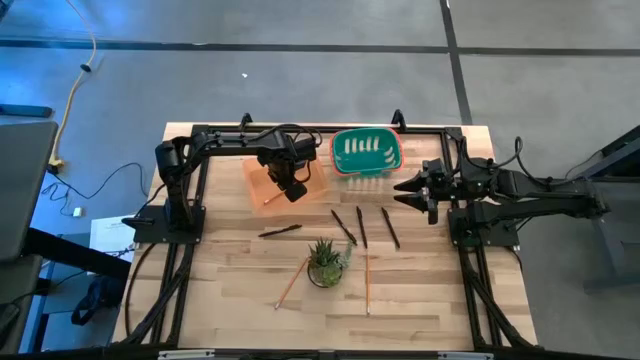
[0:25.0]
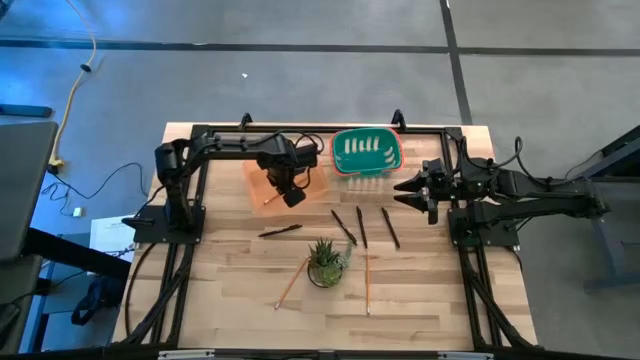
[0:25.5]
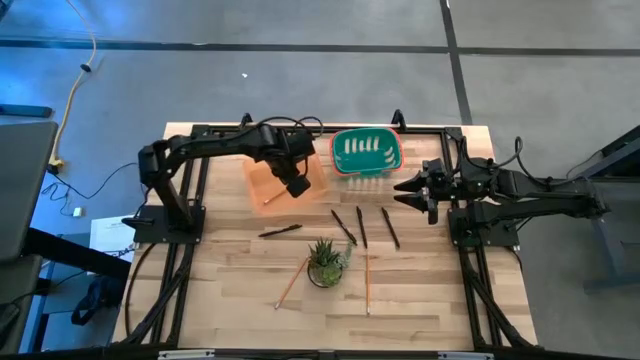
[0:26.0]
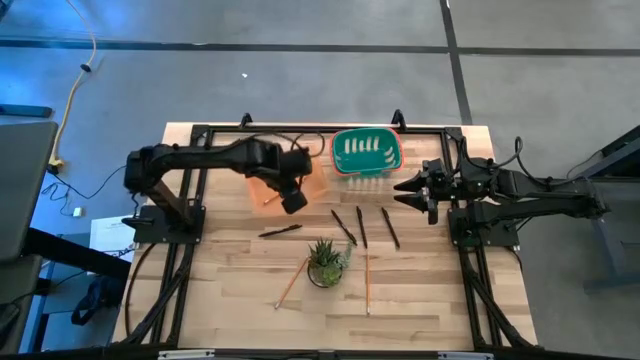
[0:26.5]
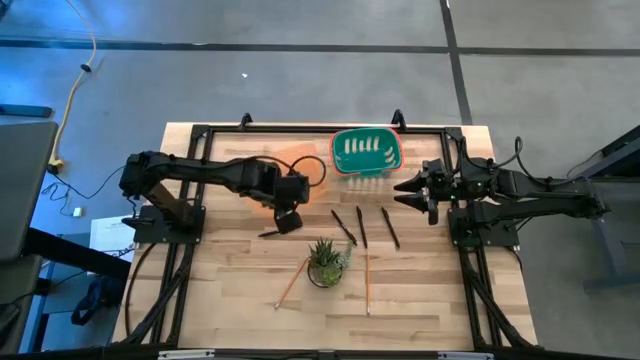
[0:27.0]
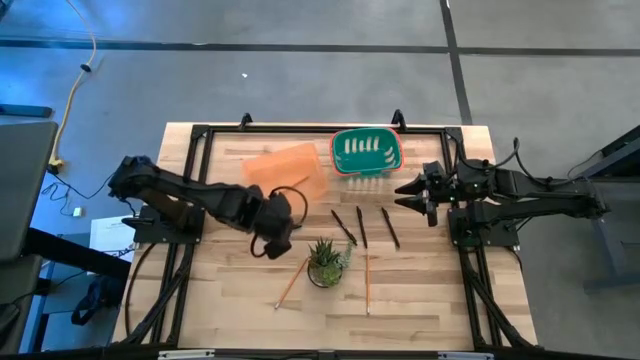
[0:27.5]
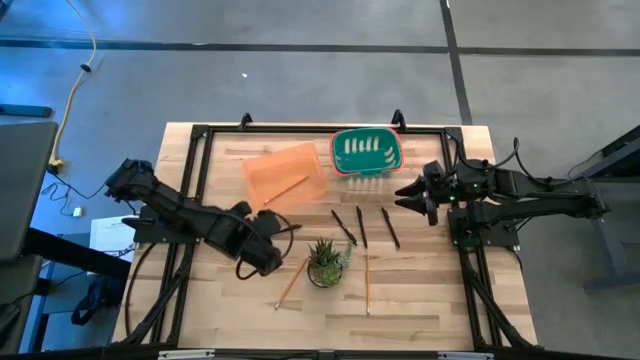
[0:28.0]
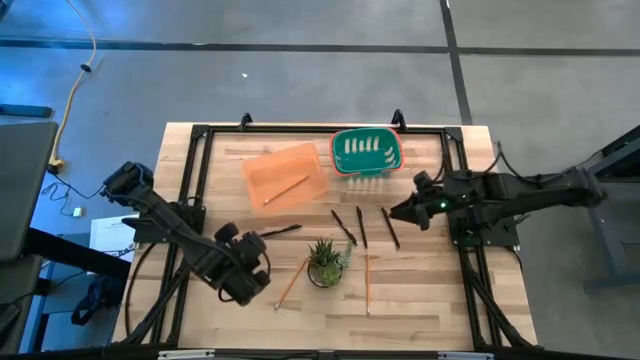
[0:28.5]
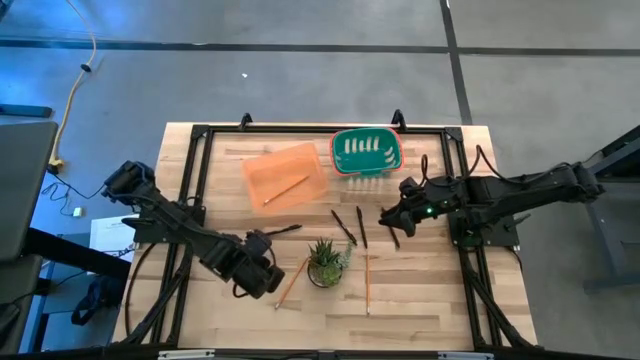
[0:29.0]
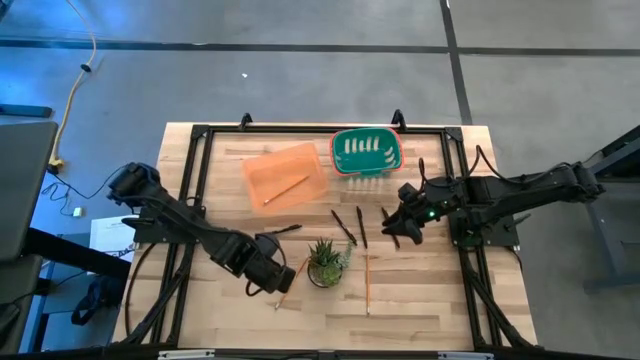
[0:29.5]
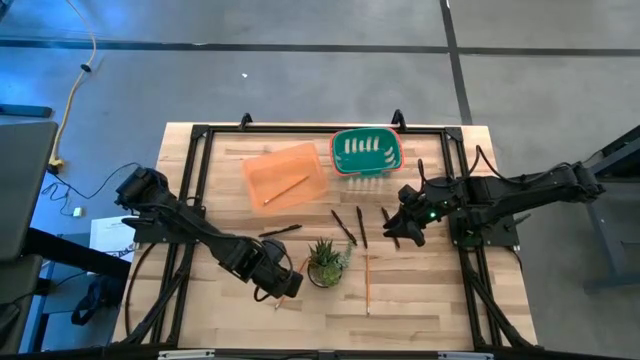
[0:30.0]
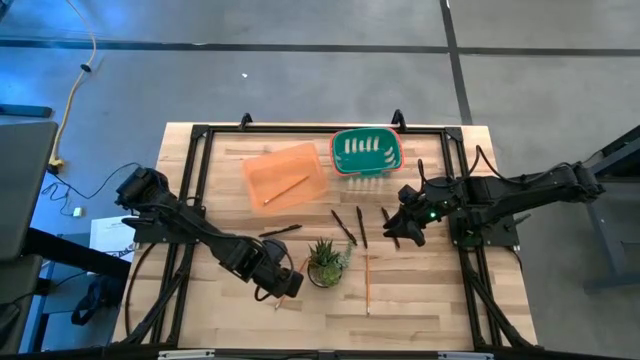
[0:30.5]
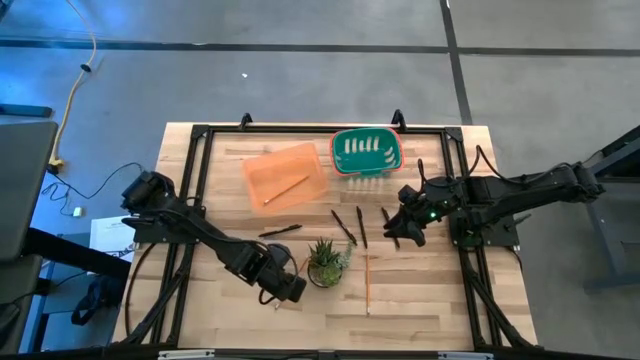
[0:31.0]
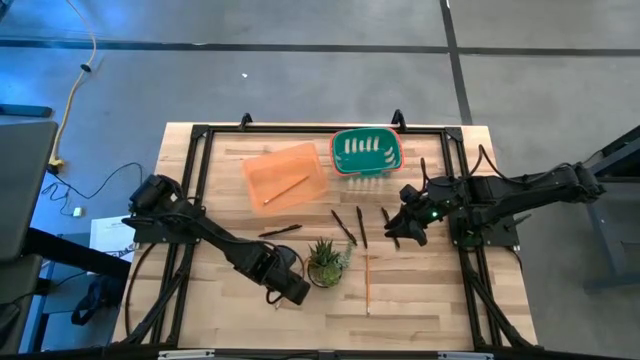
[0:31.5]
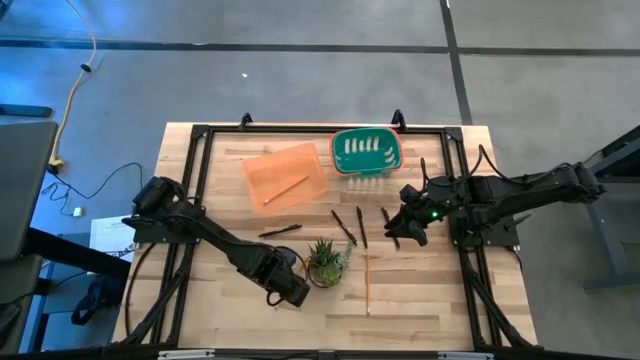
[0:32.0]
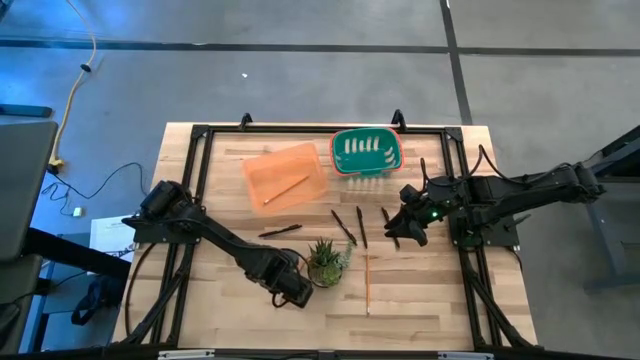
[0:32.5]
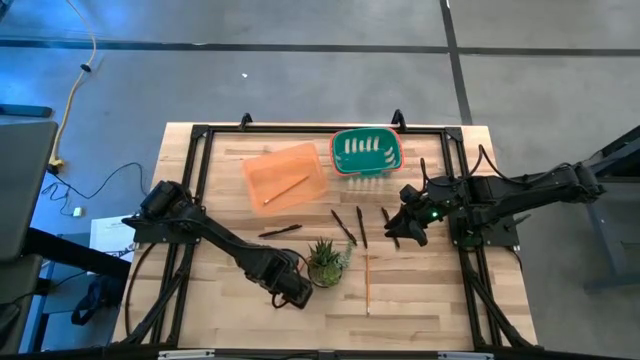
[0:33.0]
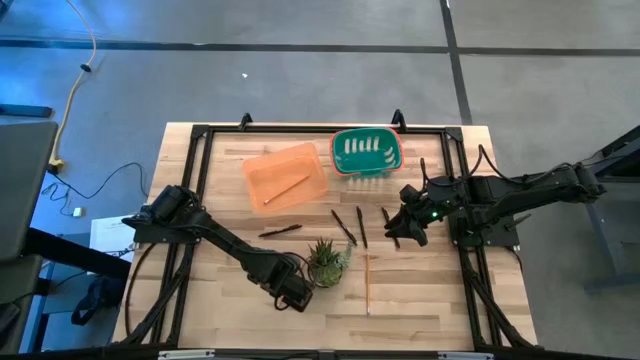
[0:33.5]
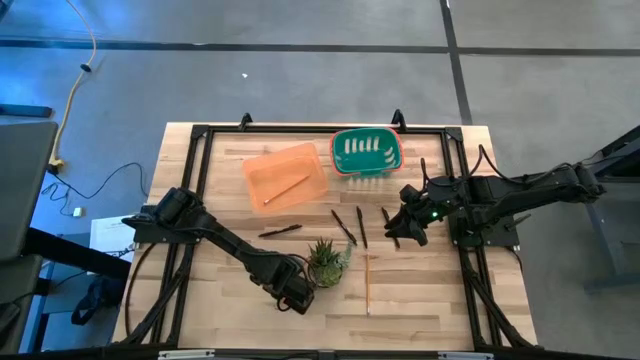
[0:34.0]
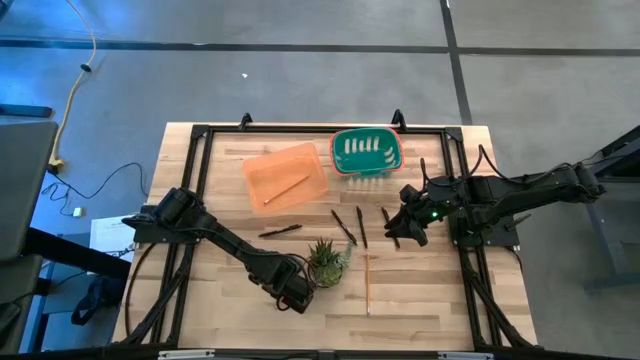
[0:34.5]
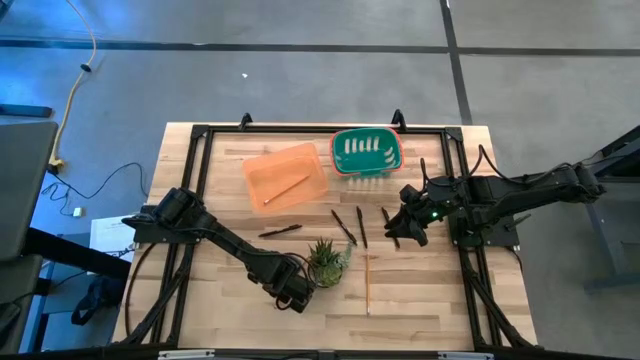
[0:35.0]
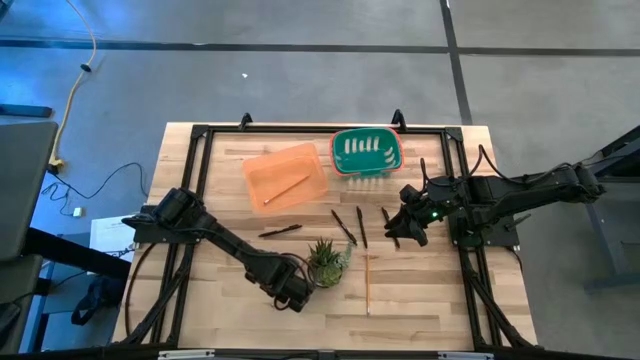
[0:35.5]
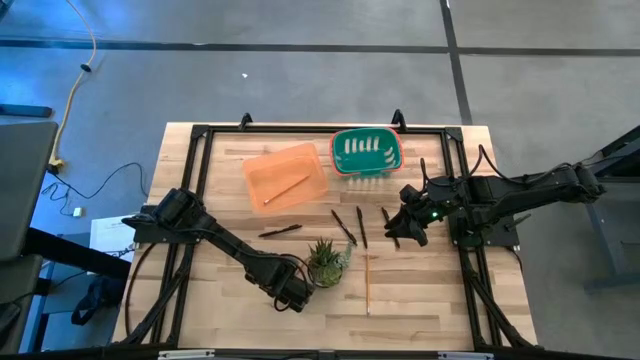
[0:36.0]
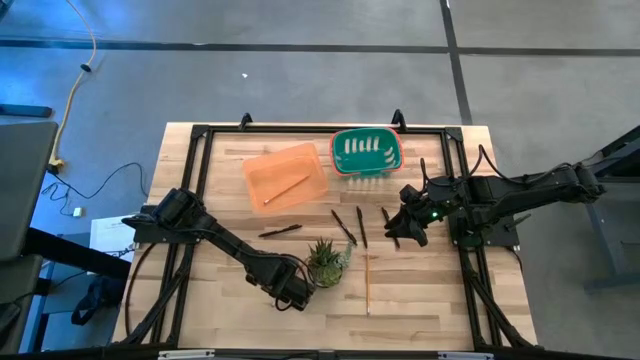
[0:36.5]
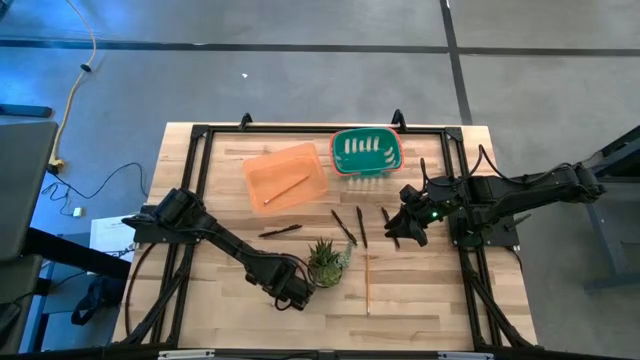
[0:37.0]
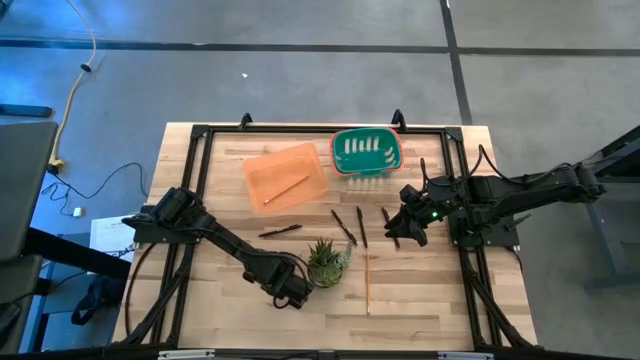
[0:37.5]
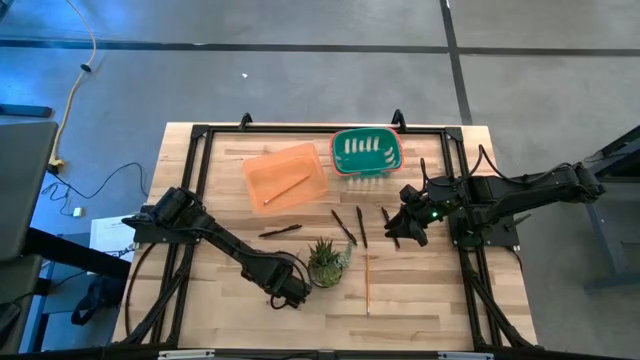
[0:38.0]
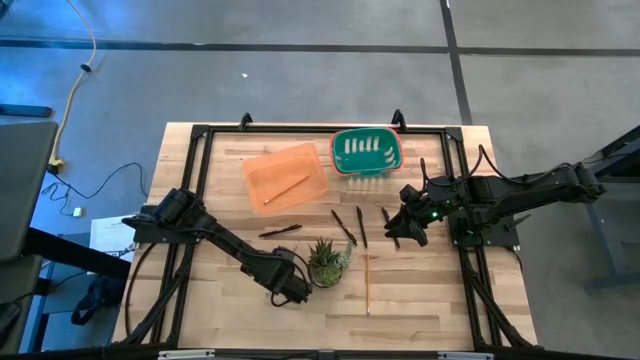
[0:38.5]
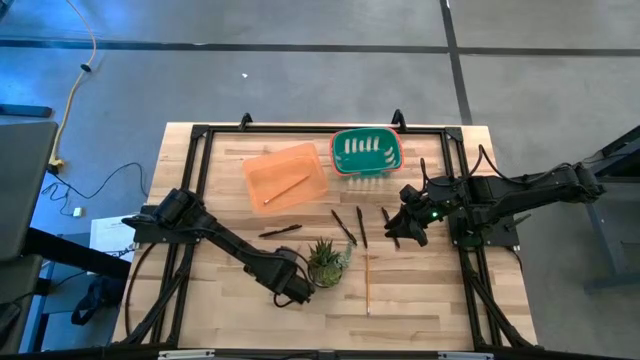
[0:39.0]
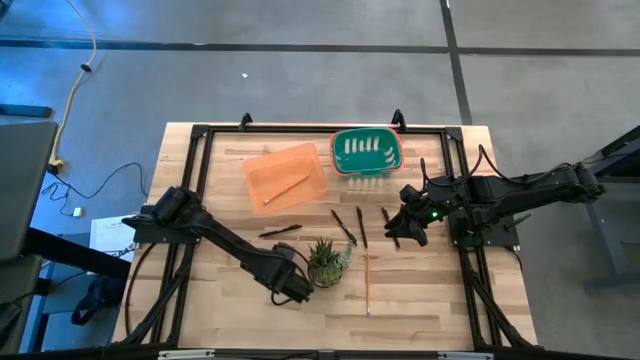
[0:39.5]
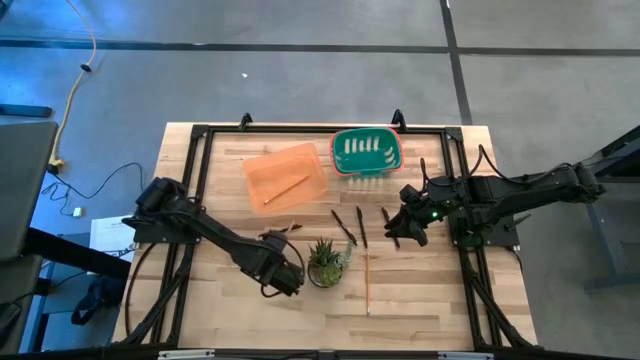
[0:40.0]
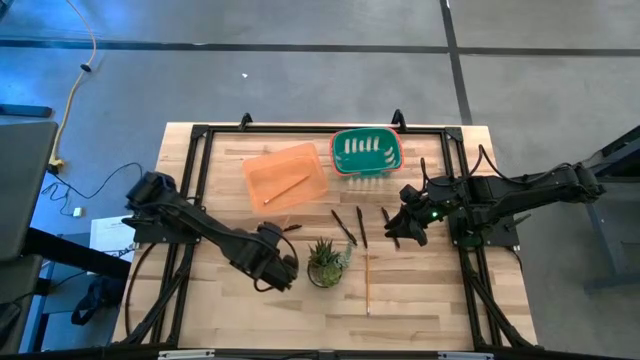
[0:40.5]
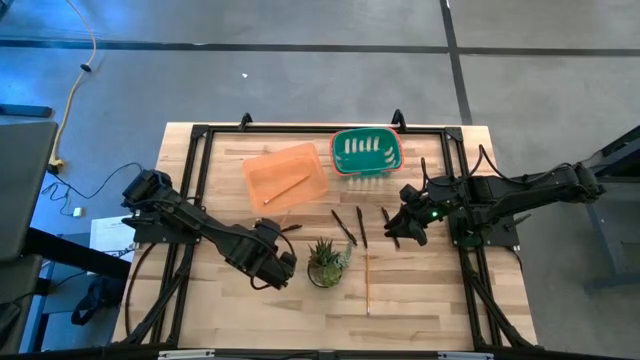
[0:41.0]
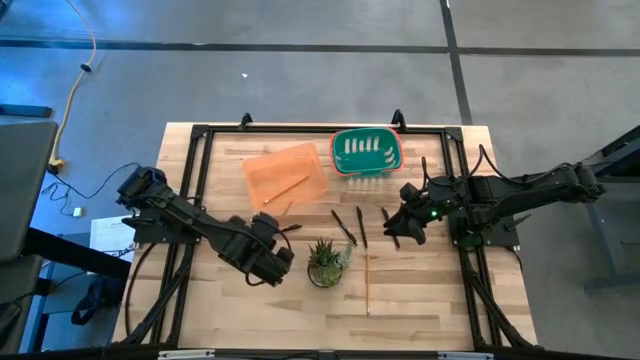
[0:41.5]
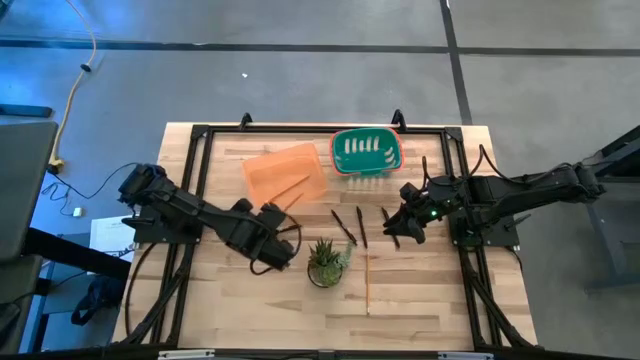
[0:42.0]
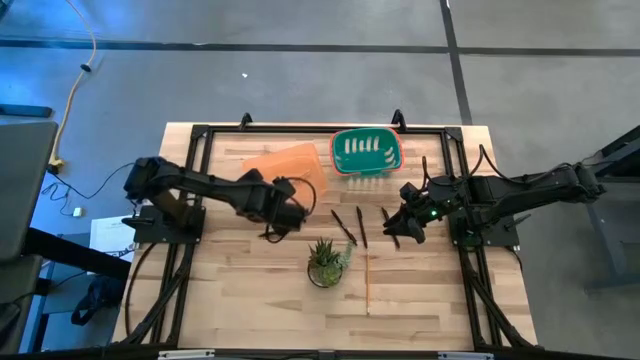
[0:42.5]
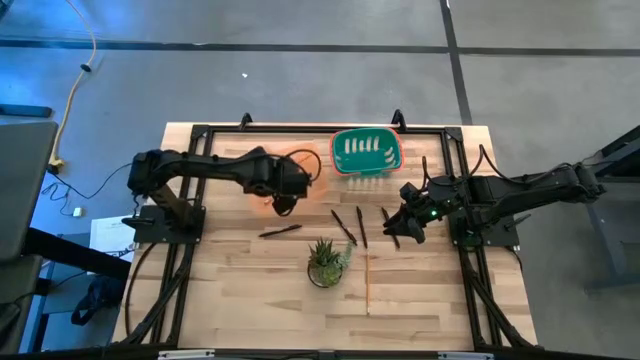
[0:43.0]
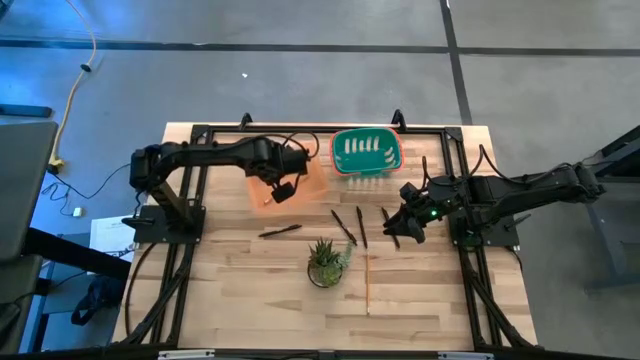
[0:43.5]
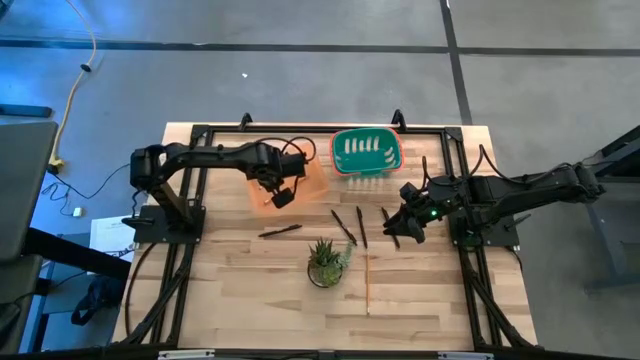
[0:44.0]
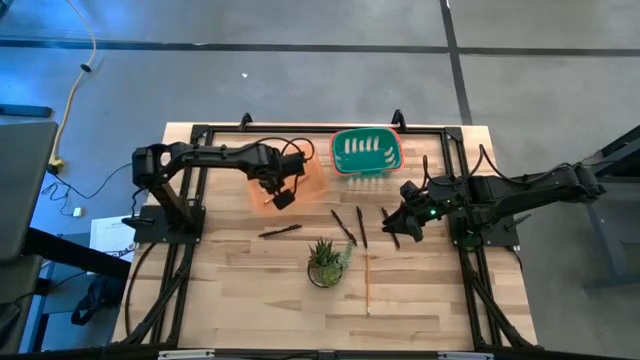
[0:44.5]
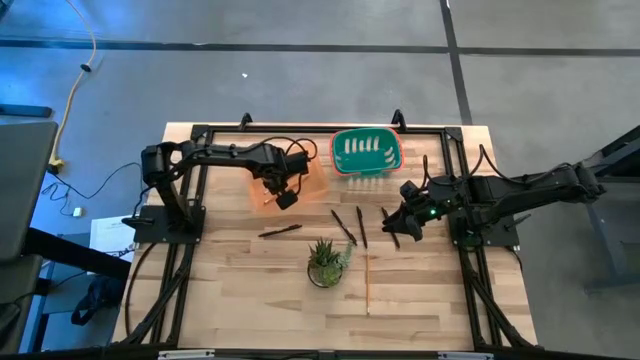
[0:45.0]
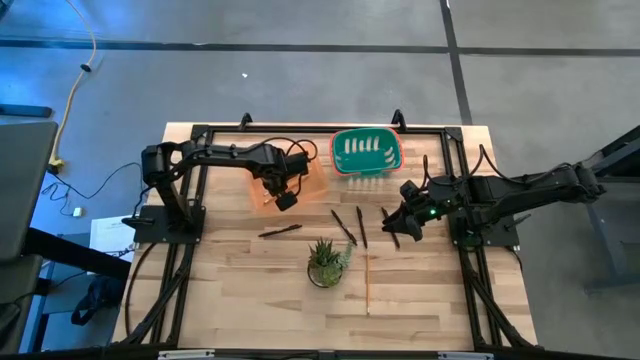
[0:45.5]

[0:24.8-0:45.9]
Task: Sort pens & pencils
Put the orange pencil into the orange bin
